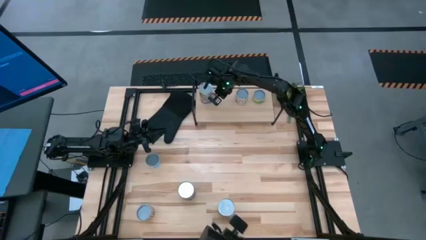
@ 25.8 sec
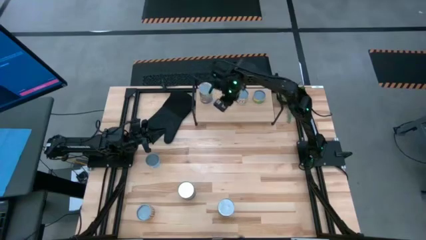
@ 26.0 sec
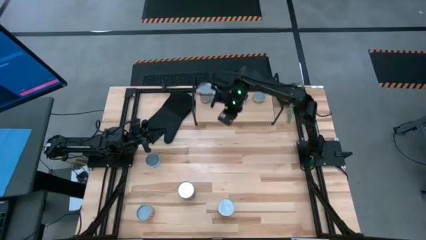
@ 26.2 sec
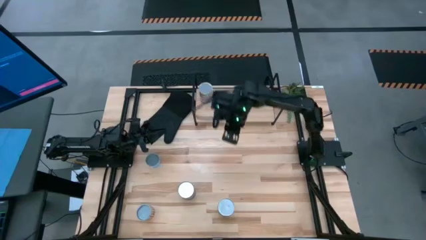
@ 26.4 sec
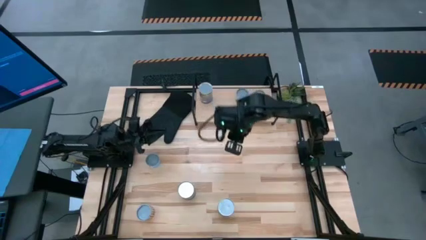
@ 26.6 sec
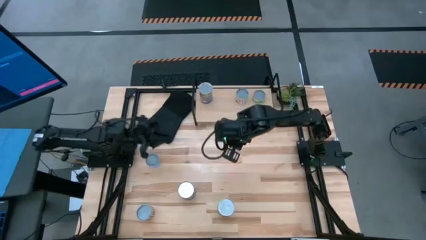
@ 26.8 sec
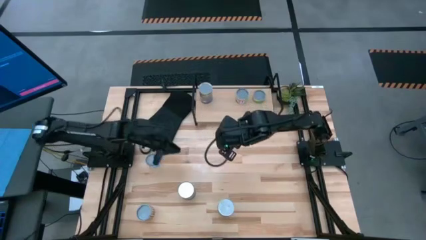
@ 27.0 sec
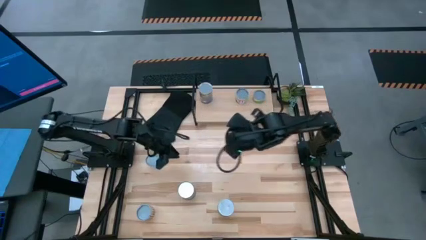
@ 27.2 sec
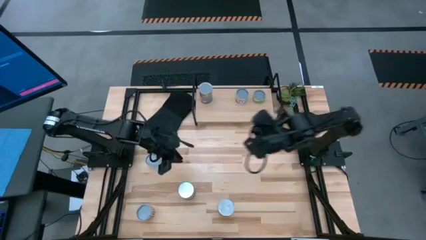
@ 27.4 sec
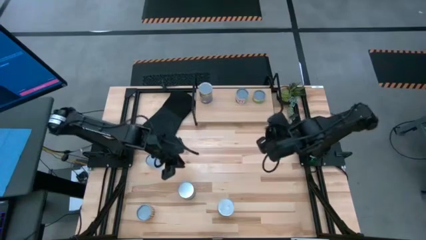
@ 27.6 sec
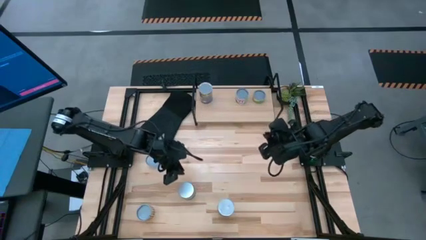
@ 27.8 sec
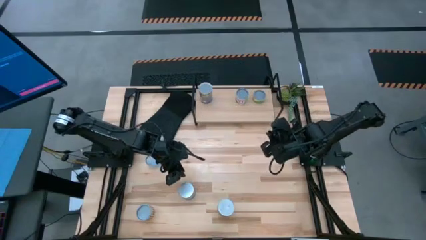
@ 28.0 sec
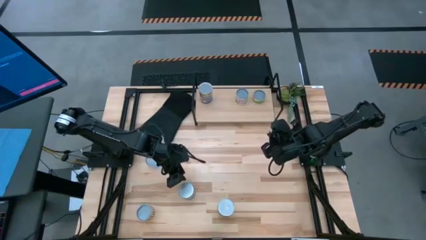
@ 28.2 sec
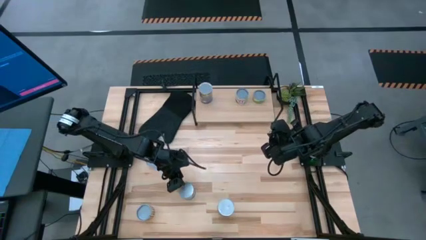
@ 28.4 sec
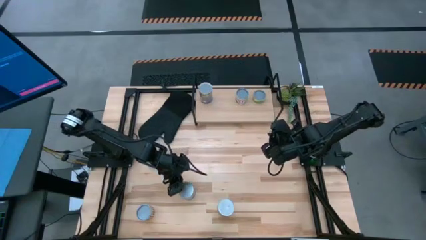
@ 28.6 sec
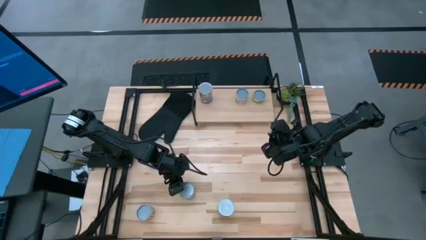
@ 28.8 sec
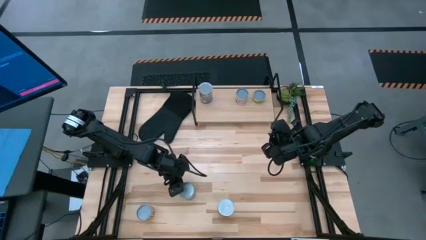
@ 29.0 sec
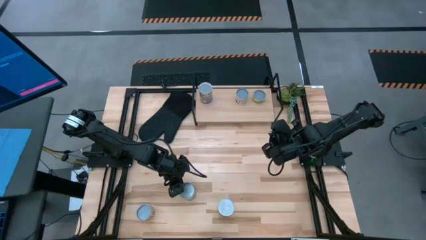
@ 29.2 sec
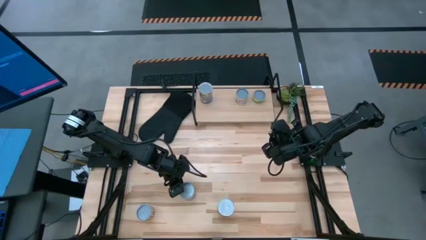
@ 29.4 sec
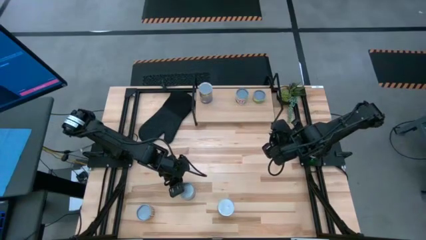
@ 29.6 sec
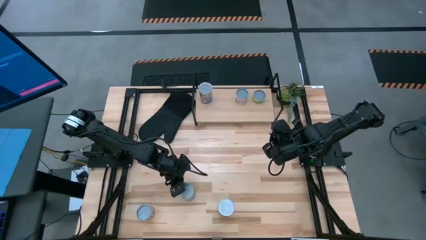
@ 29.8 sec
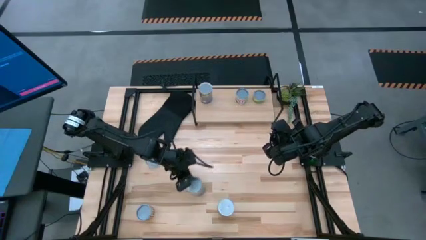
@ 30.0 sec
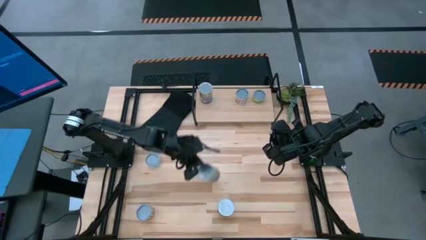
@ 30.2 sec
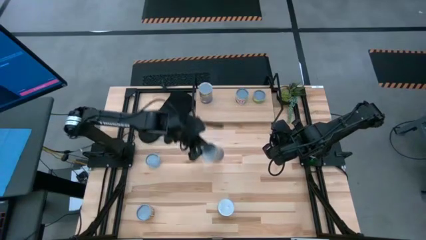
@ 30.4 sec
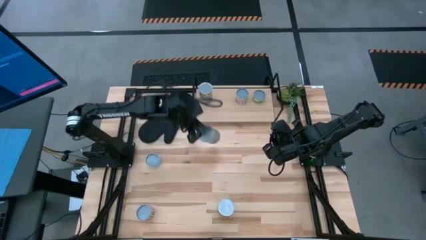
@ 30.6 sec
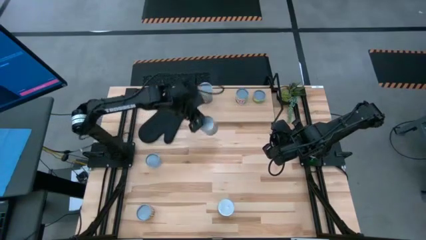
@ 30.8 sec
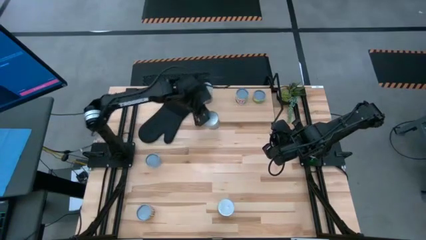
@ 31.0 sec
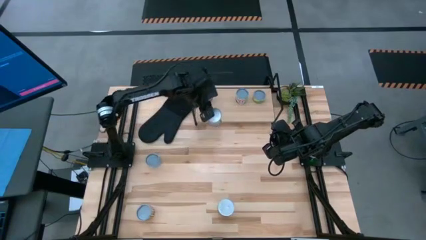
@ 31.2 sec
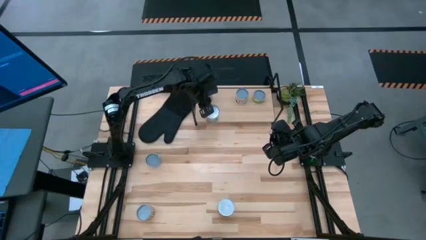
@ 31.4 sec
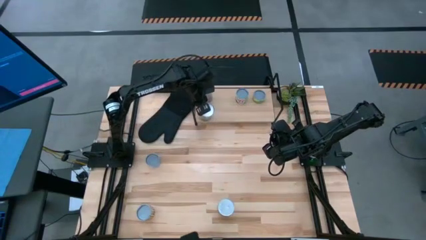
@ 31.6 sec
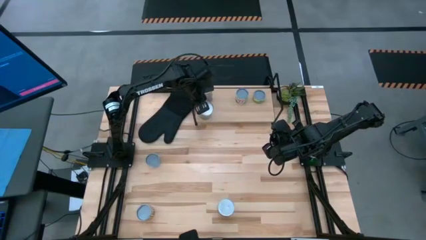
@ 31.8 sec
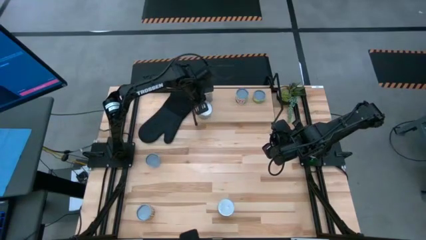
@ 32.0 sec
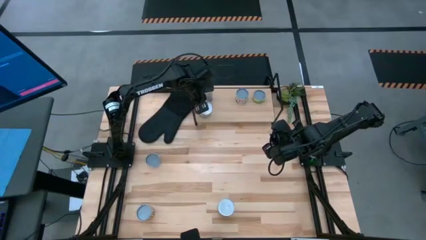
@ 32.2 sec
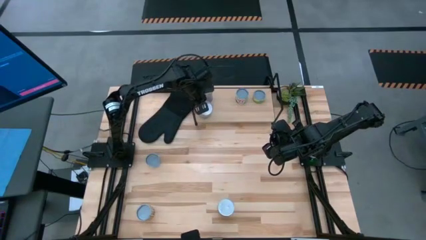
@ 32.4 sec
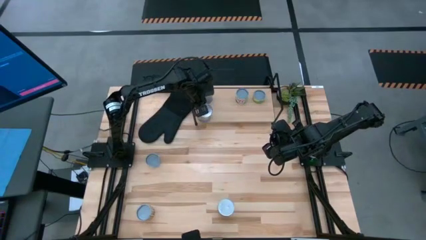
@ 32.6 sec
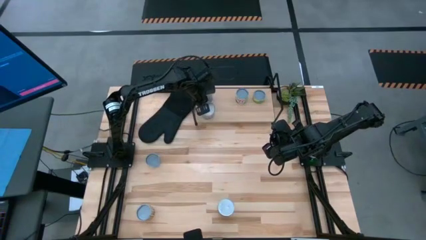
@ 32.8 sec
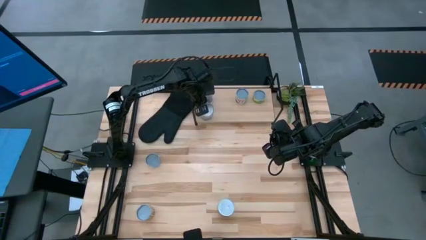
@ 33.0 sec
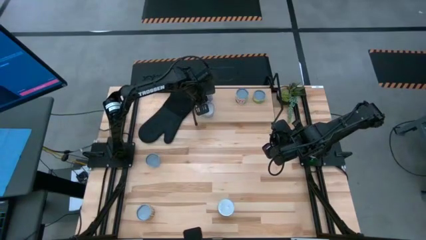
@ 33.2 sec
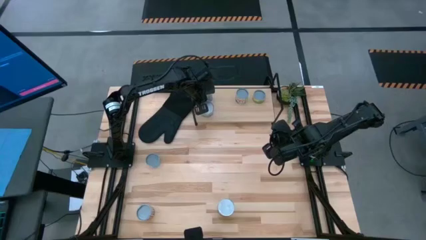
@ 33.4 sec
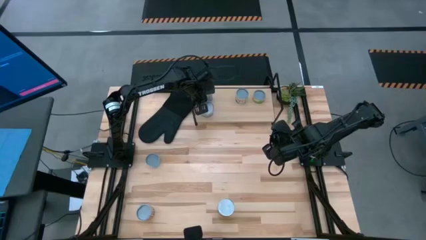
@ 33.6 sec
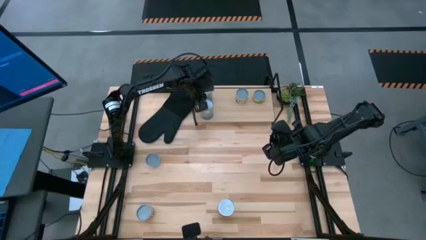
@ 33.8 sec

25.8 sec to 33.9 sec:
Task: Pick and place cans onto a shelf
Put the large canned peas on the shelf

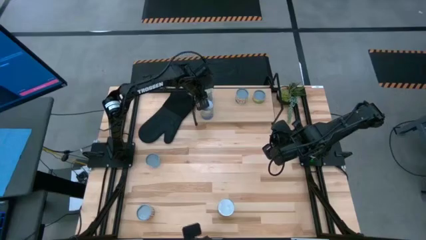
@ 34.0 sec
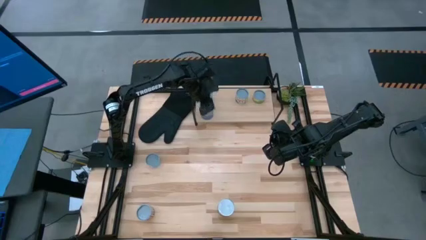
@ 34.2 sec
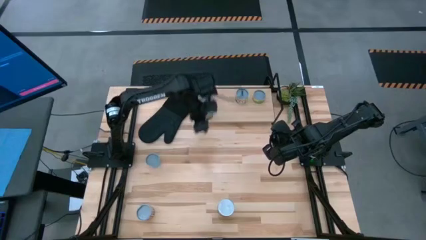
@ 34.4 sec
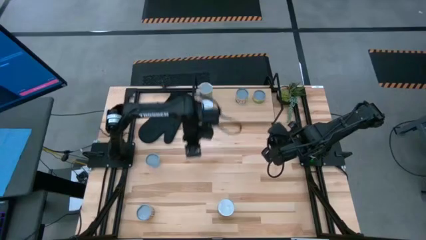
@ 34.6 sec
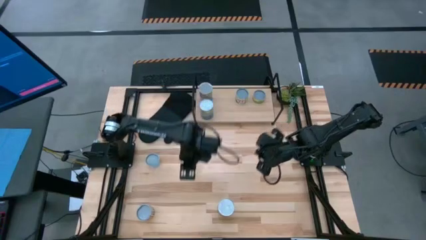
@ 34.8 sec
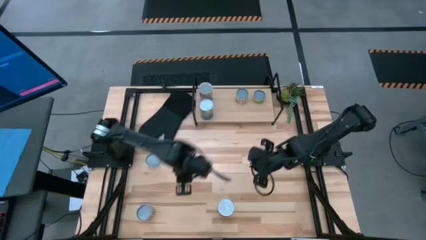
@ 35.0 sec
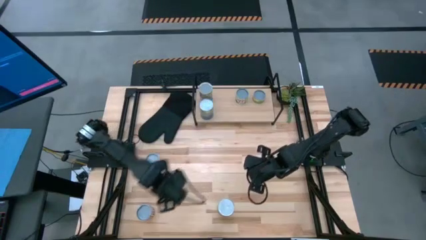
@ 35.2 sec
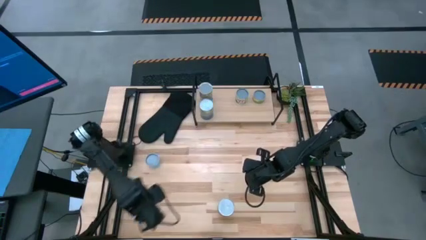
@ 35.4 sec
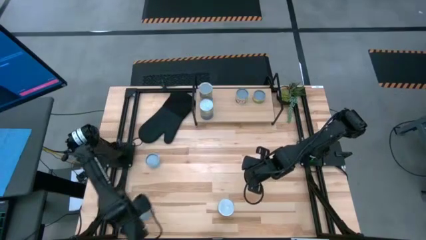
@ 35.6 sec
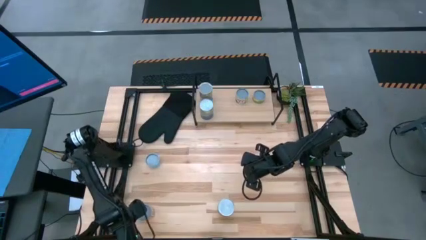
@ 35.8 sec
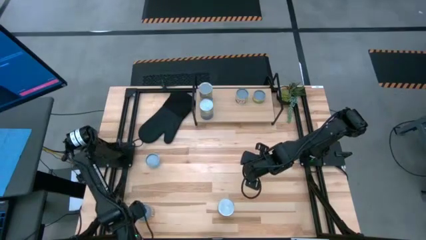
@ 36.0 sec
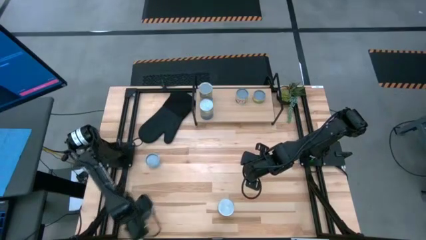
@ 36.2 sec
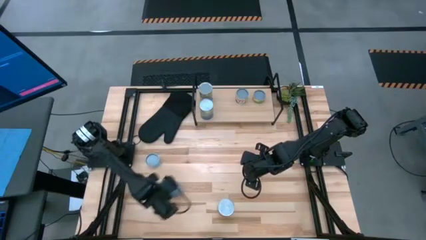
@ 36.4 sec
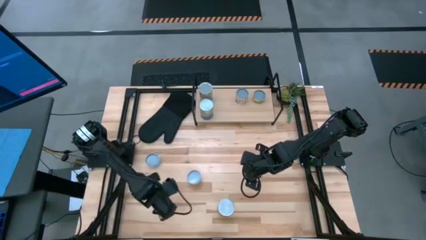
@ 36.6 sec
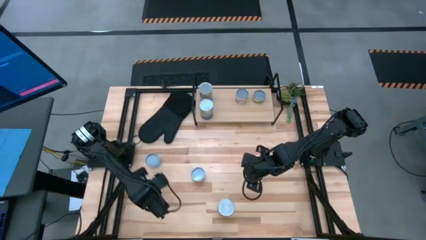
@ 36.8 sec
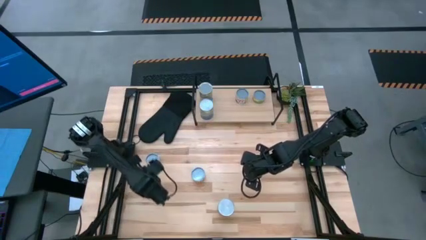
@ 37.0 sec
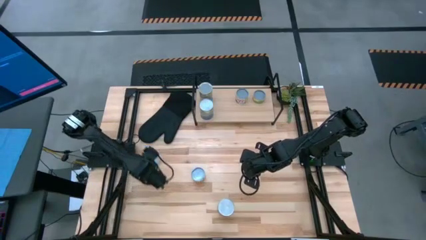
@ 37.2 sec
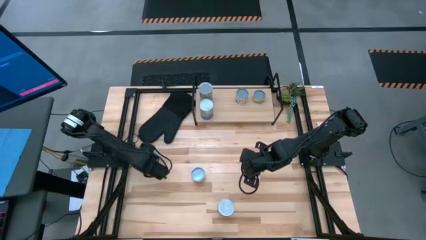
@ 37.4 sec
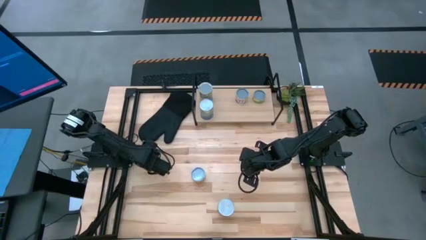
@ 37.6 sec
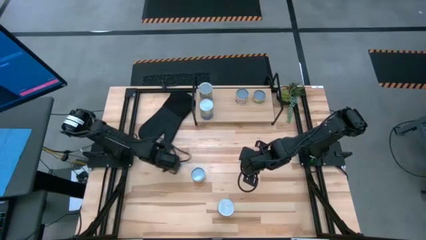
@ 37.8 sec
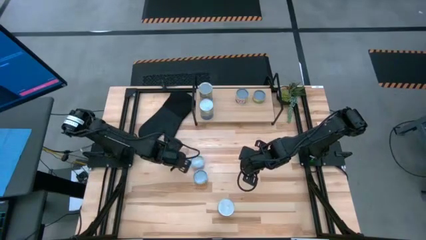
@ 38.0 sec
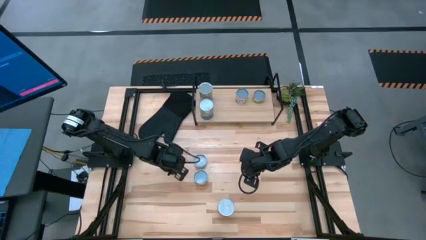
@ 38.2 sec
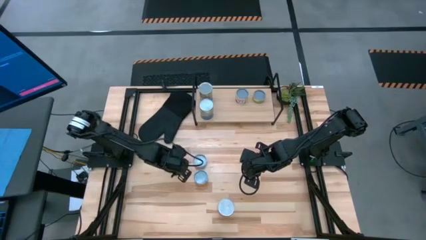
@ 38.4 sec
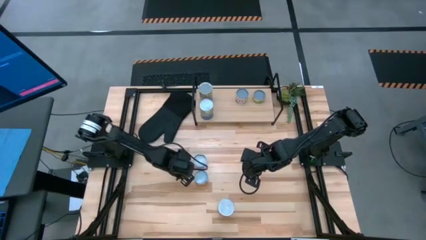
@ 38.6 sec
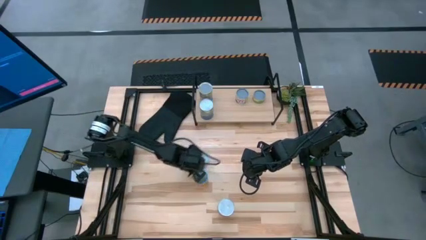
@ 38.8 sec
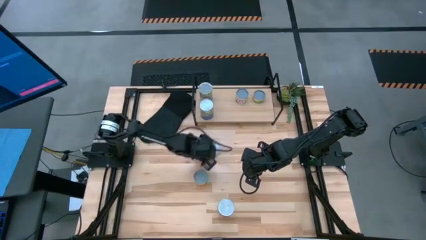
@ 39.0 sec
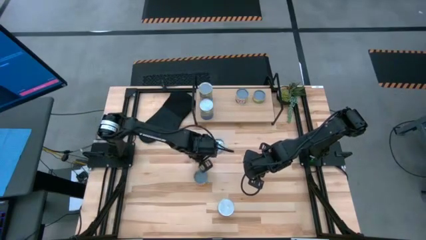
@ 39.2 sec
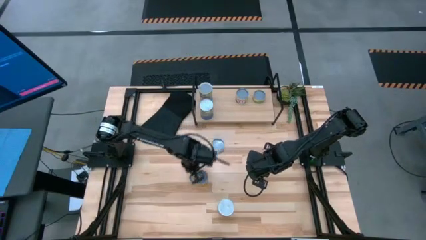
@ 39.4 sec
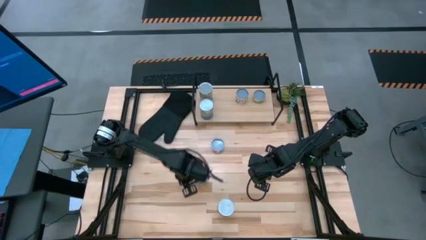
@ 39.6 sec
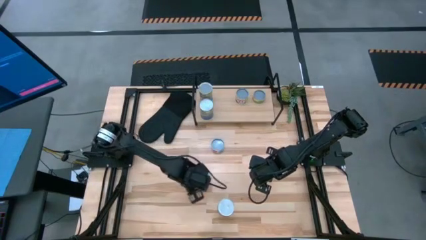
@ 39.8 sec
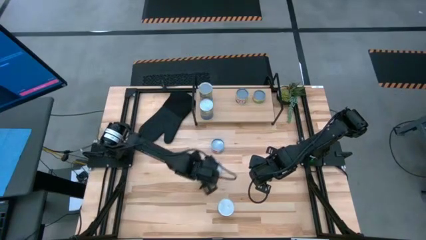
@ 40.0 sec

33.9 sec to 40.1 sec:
Move the canned goods to the center of the table

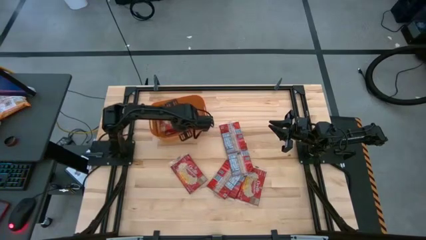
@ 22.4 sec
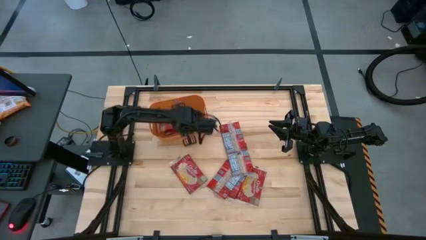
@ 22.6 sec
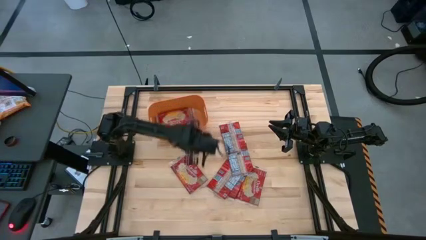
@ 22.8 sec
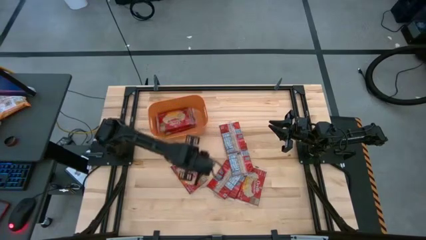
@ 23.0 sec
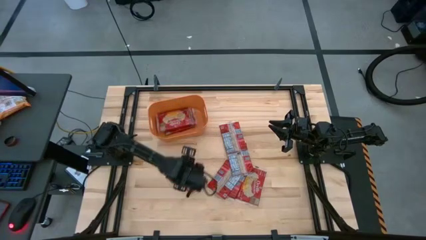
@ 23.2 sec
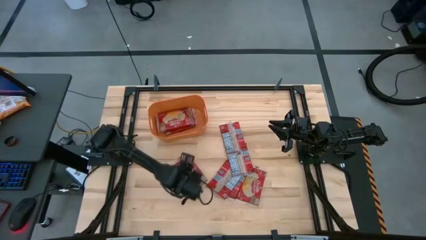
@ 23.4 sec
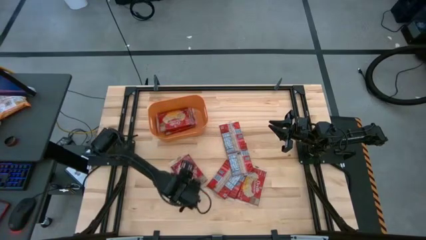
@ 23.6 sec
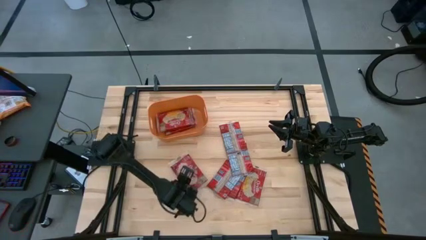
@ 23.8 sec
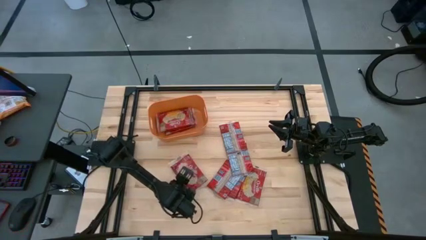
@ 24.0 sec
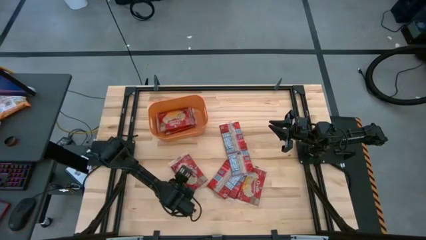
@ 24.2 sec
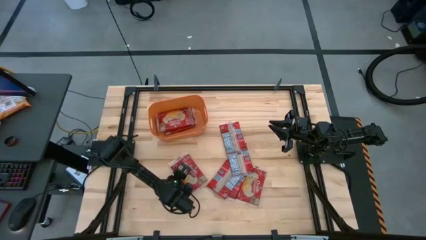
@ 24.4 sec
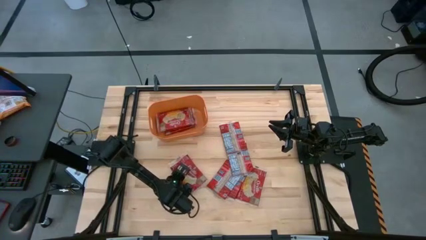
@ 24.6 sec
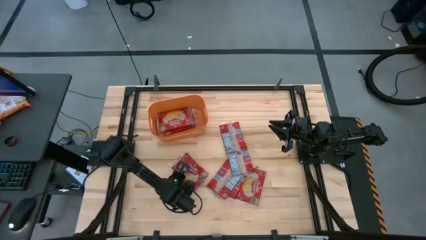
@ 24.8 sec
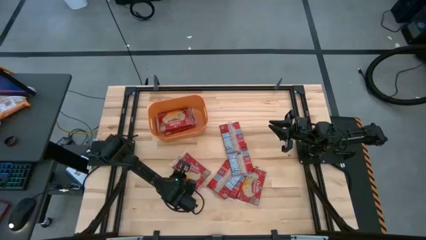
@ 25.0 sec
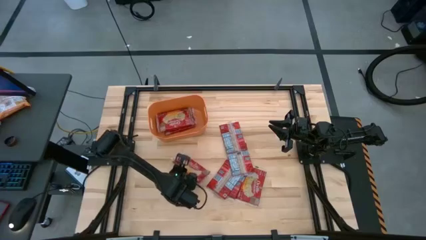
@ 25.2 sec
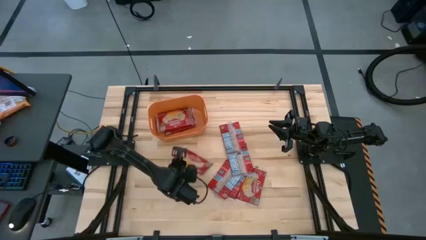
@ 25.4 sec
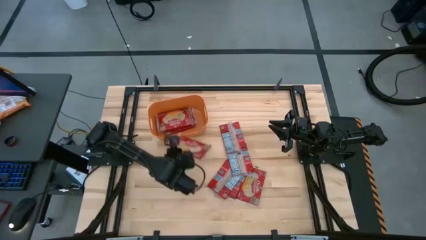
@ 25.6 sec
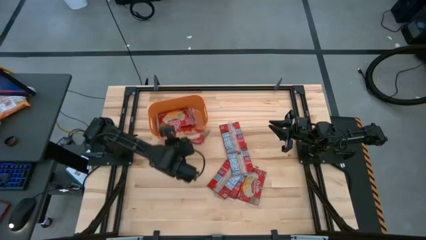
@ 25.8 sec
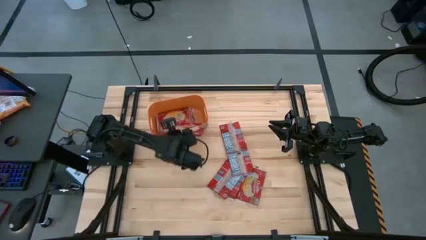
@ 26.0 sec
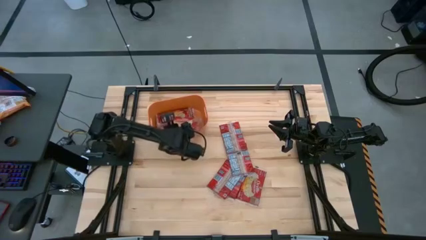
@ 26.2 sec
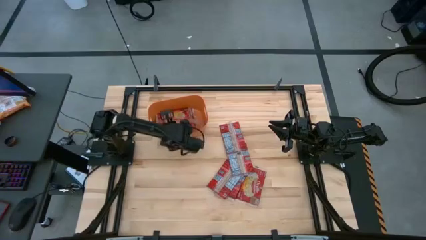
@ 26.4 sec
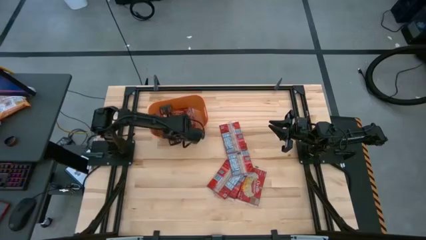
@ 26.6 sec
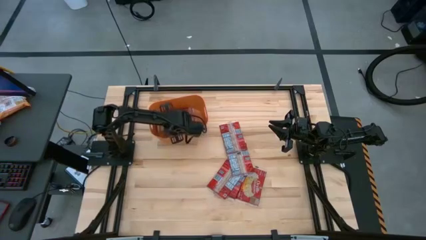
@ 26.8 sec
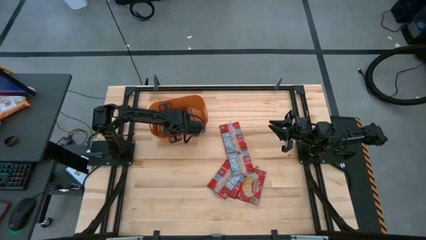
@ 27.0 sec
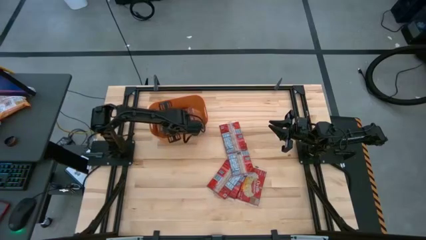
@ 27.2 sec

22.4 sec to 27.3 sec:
Task: Sort popcorn bags into baskets
Put the red popcorn bag into the orange container
